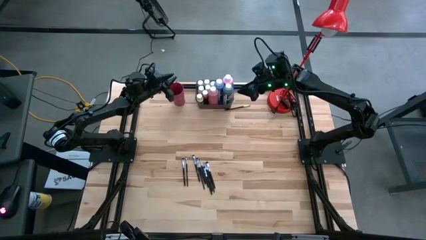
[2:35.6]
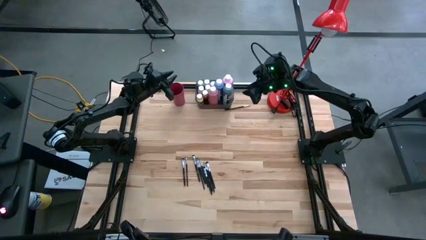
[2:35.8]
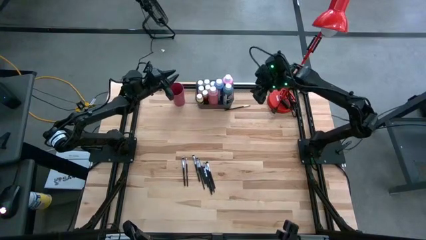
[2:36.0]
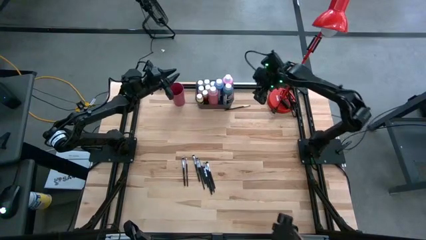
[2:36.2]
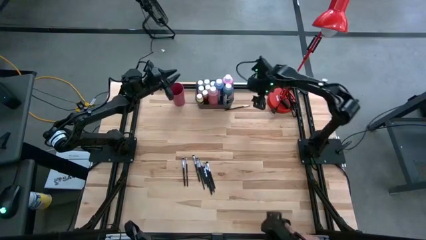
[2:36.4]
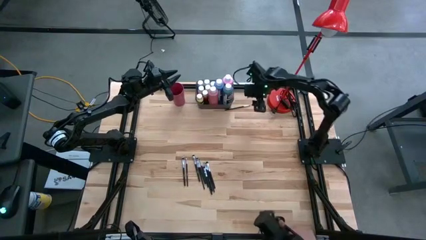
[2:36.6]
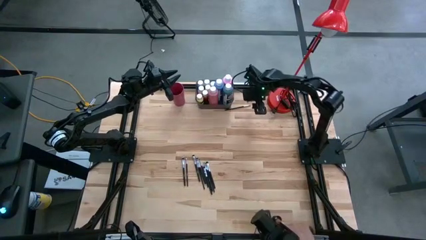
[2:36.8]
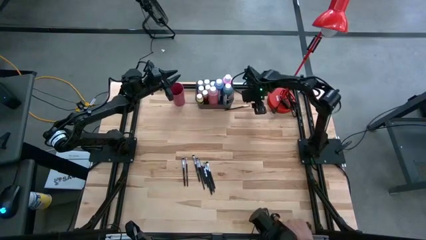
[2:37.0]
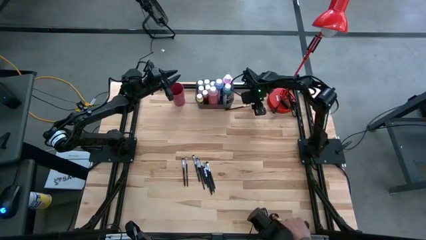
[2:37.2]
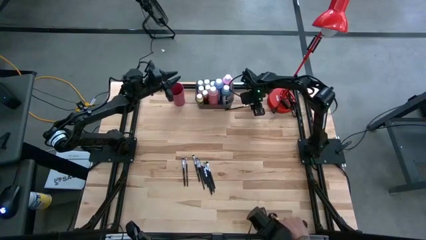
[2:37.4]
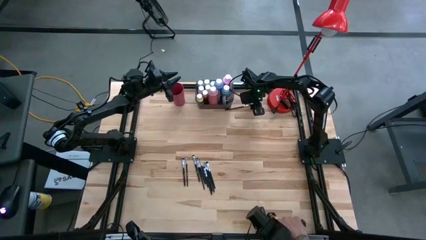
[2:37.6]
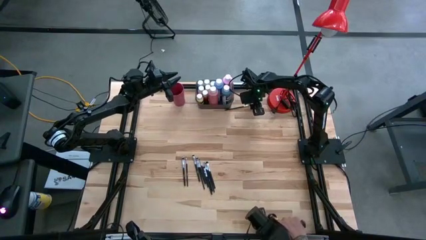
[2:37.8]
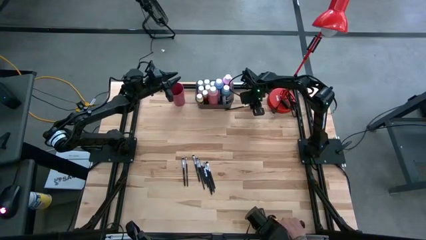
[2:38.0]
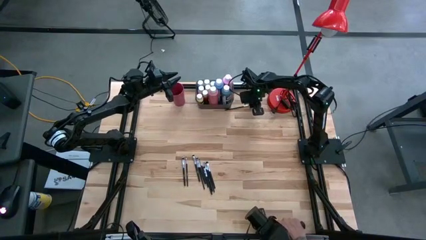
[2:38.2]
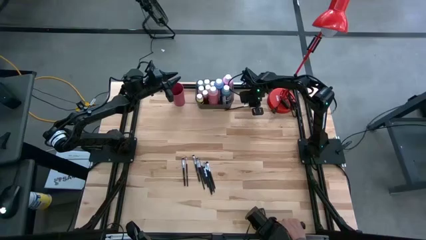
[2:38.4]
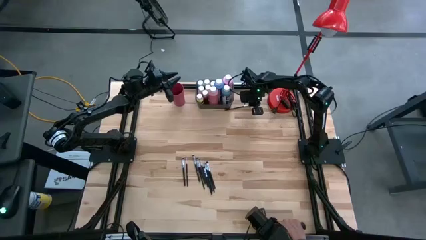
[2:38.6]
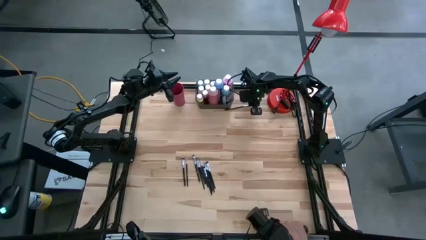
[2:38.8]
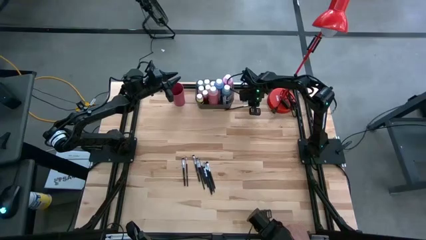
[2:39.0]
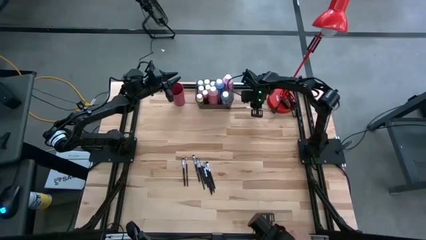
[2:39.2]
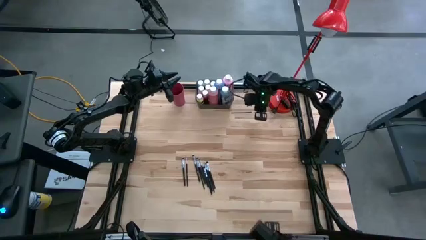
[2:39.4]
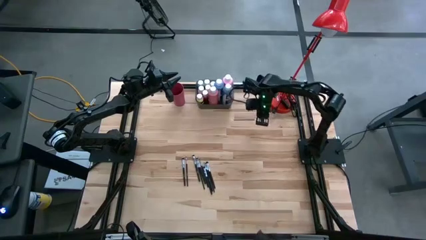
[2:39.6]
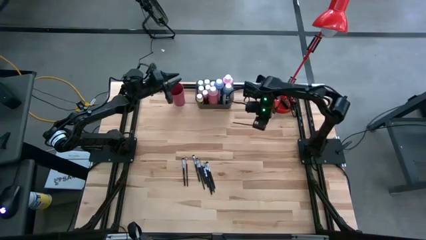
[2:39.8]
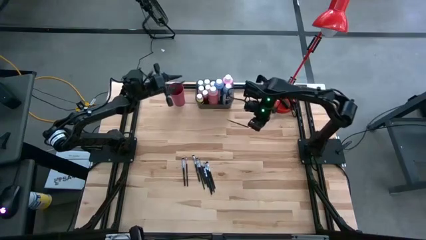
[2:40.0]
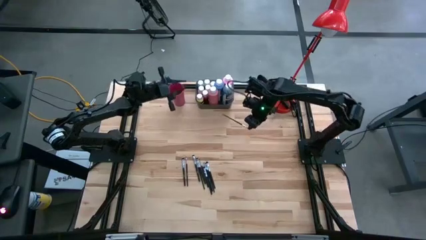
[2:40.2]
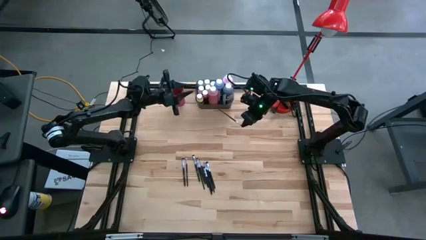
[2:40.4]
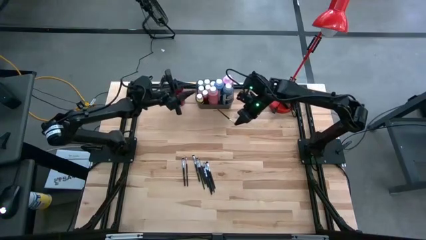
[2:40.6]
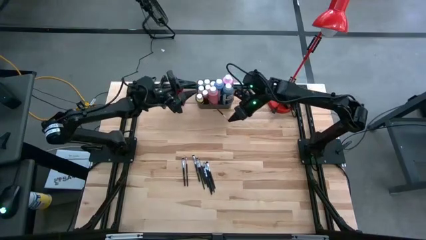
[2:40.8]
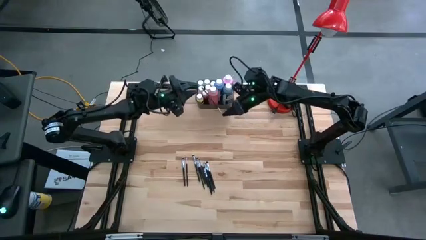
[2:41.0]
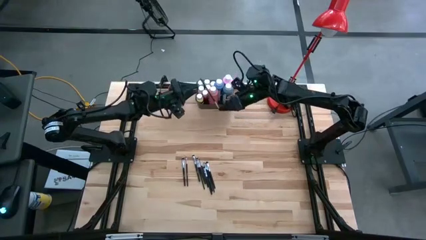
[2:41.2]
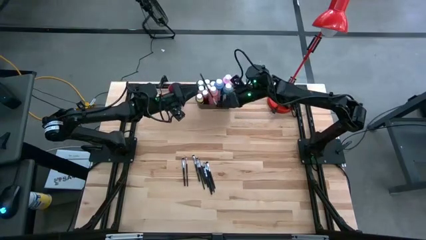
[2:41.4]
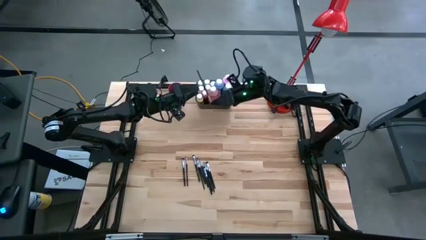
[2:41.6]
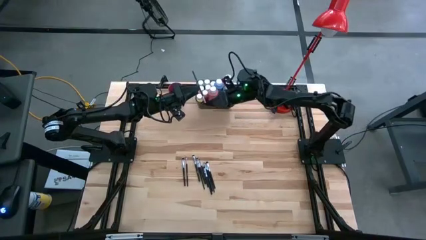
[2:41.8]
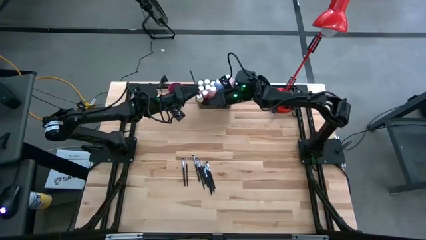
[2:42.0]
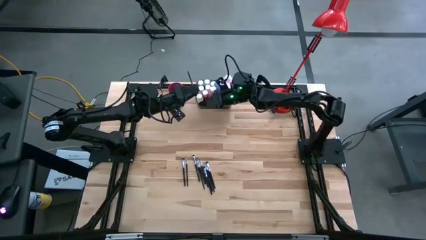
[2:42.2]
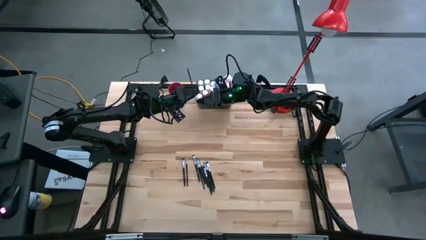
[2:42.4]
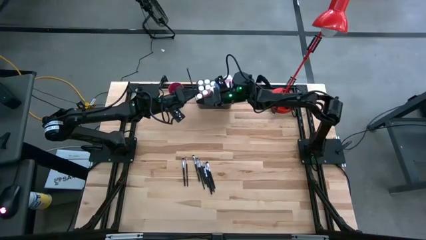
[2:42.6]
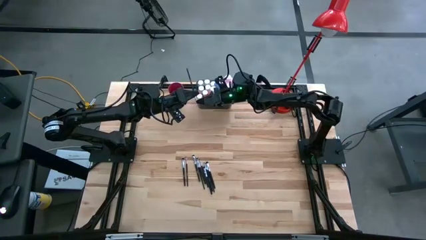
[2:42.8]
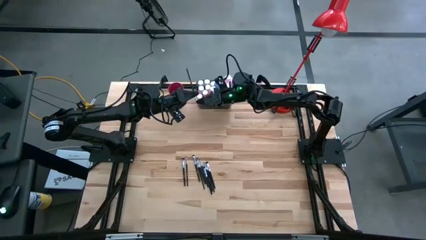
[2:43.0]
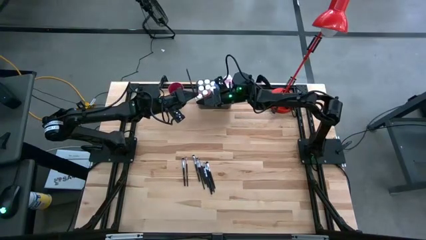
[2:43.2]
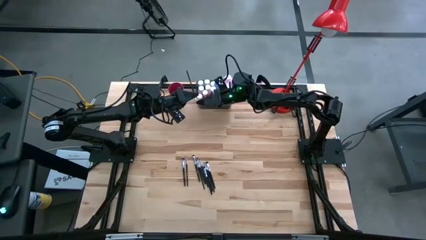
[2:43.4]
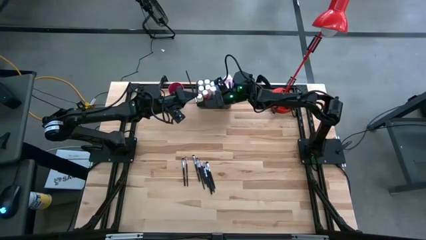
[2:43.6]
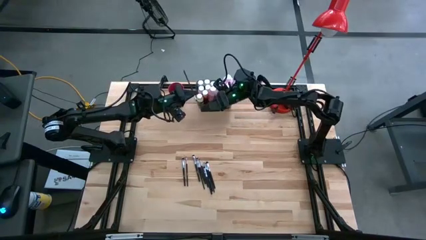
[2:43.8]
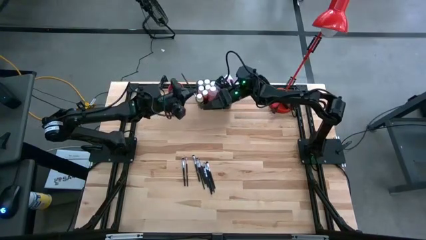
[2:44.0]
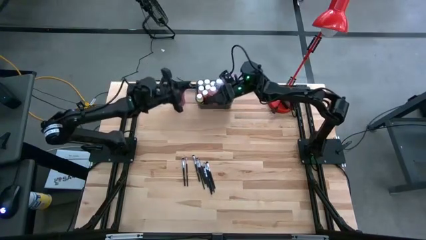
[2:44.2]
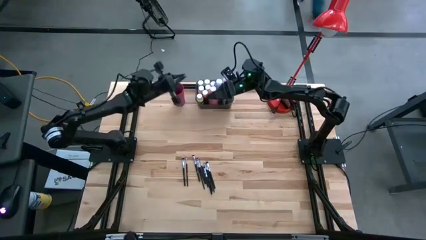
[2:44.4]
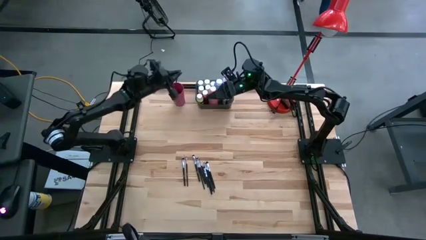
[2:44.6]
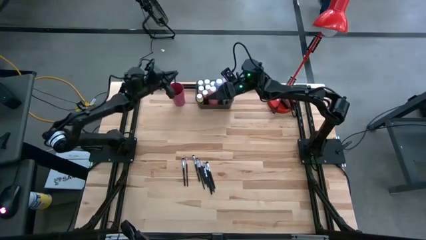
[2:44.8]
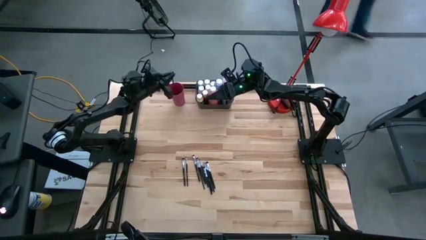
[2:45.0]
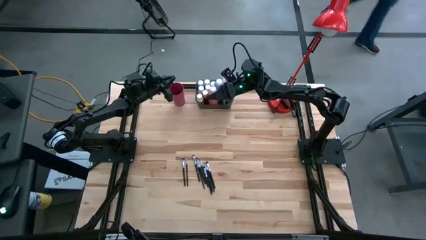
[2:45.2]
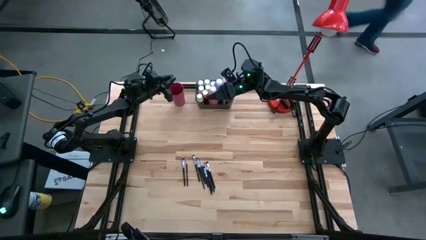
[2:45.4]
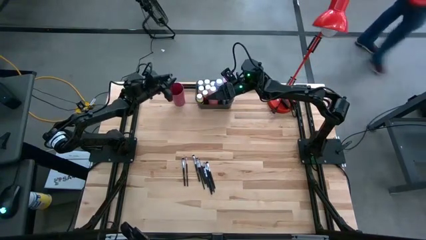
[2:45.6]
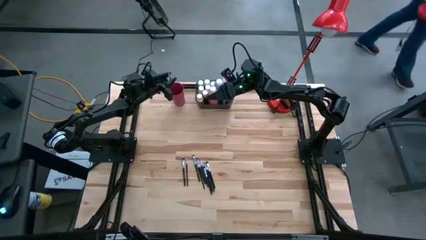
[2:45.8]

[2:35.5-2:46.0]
Task: Pick & Place Paint Supplies
Put the black paint brush into the pink cup
